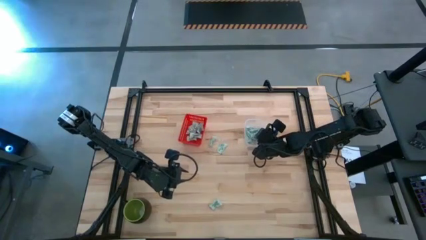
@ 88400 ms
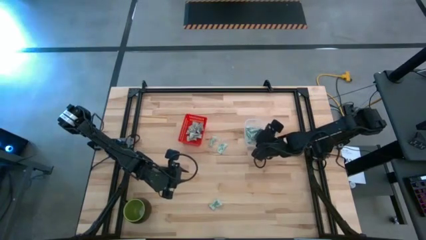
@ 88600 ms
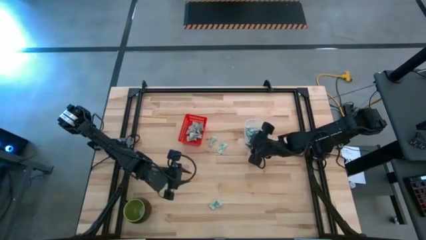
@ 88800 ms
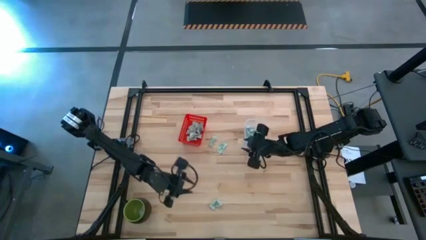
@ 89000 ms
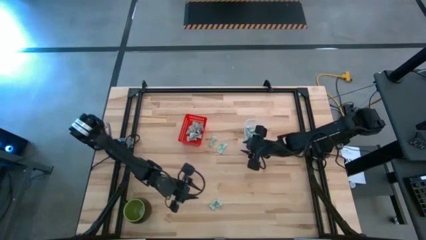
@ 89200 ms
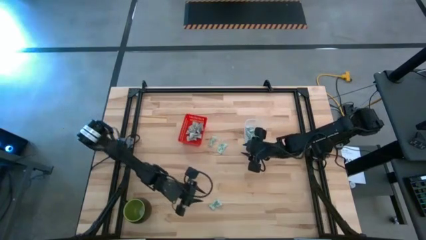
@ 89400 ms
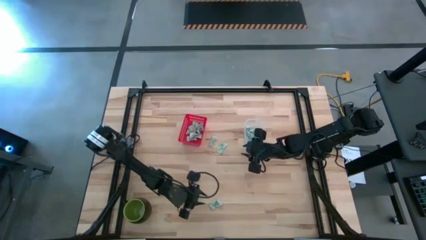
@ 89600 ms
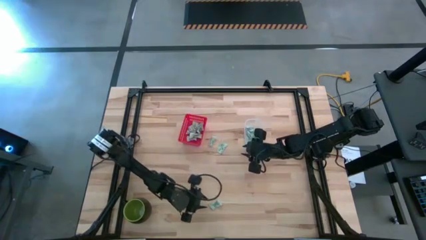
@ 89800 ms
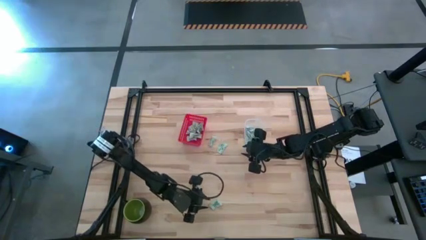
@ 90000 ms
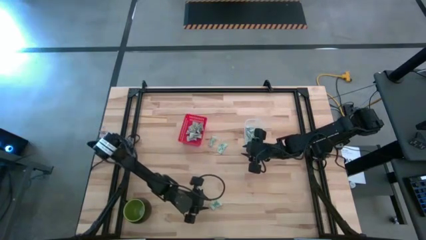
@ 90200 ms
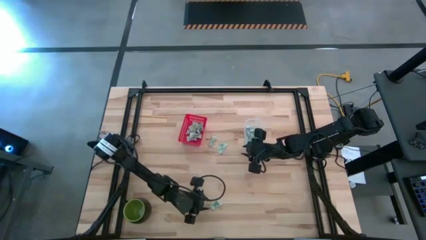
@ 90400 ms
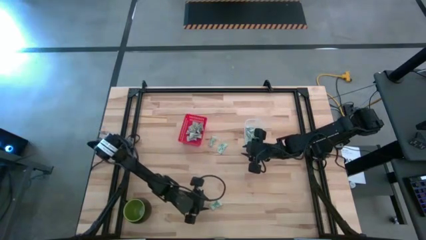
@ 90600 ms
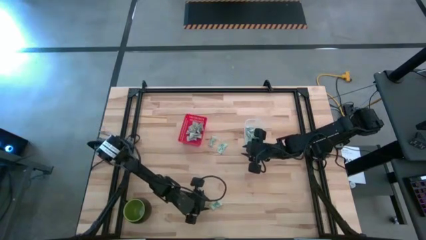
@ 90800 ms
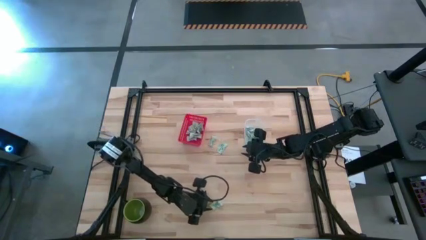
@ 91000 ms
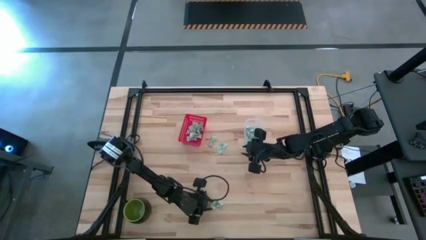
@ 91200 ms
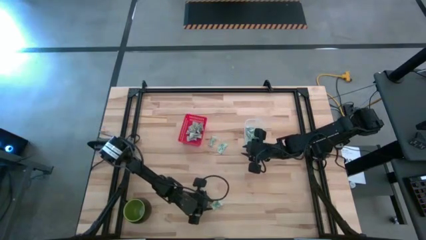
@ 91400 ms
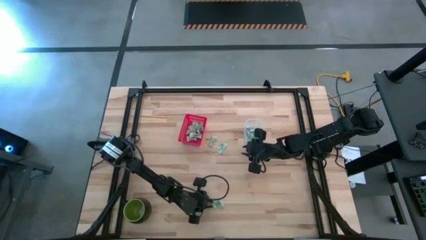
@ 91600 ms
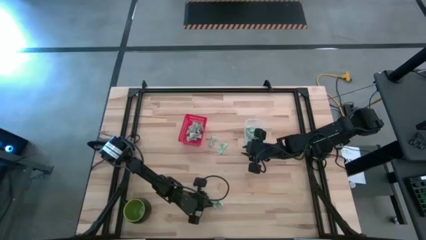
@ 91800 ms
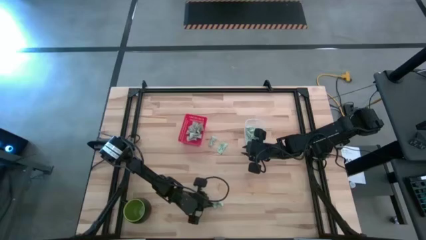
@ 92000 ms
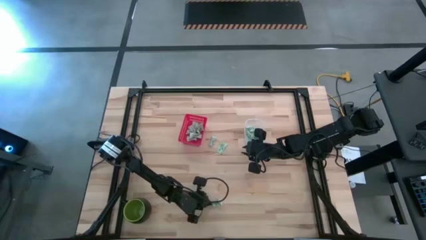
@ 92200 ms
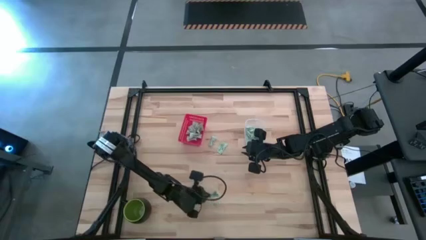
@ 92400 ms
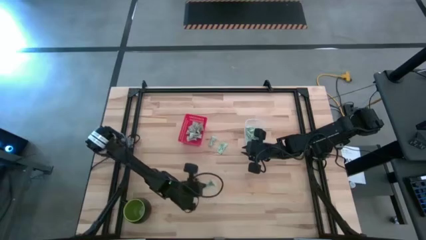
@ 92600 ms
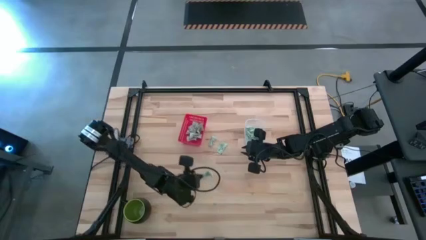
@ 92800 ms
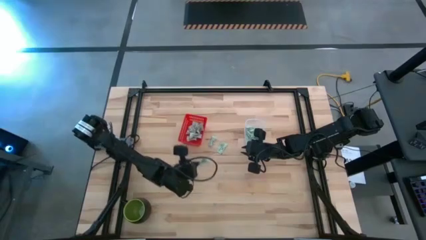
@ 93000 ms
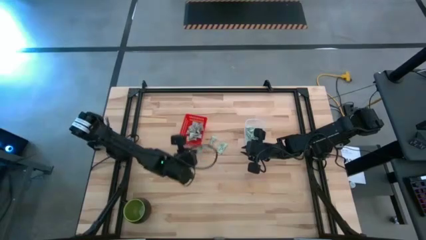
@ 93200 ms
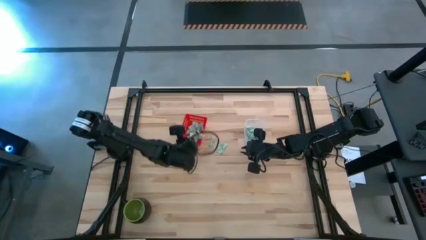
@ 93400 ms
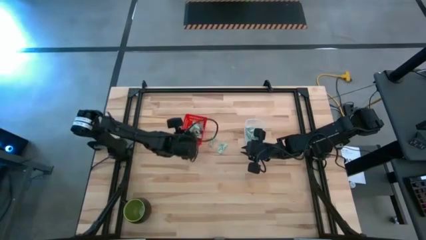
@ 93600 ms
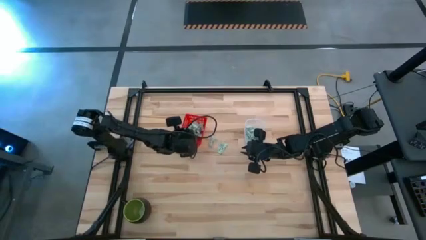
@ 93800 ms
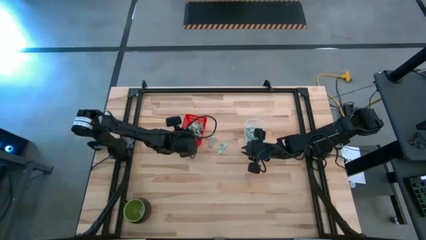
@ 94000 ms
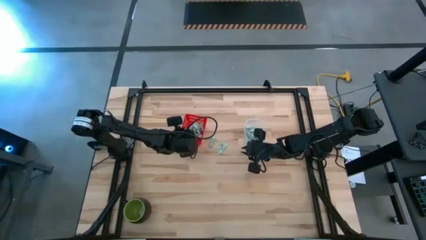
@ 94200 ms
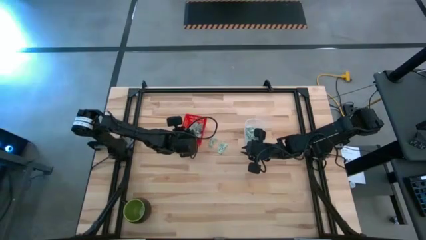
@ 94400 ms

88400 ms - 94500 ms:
Task: Pick and place items into bin
Put the stevia packet into the red bin

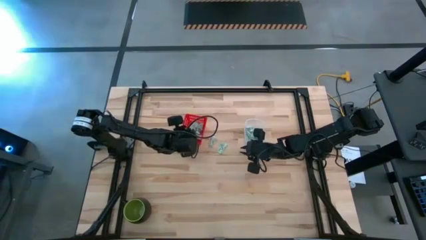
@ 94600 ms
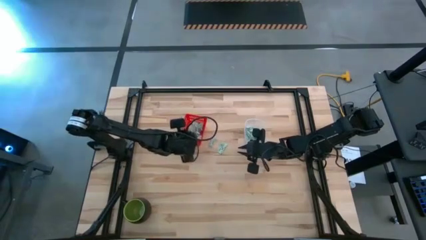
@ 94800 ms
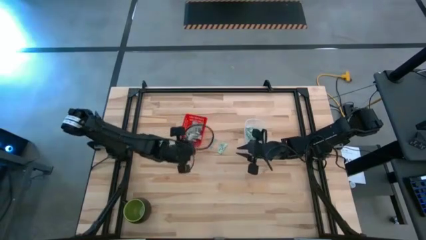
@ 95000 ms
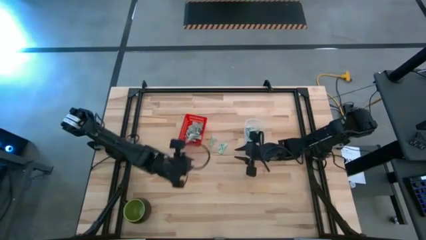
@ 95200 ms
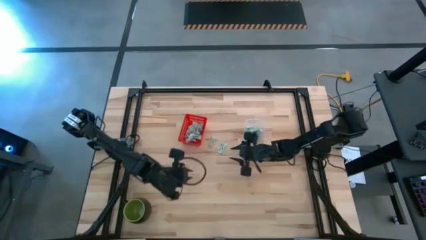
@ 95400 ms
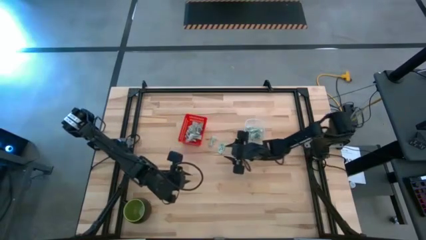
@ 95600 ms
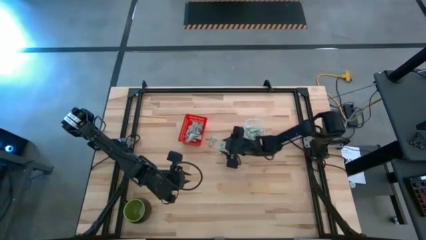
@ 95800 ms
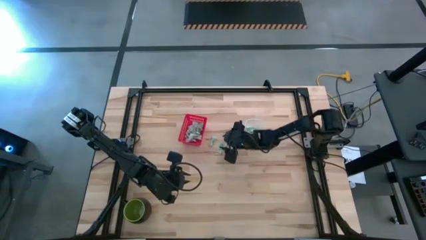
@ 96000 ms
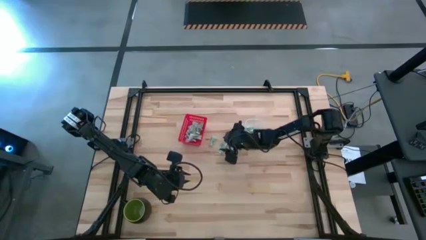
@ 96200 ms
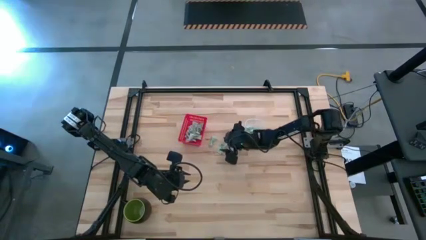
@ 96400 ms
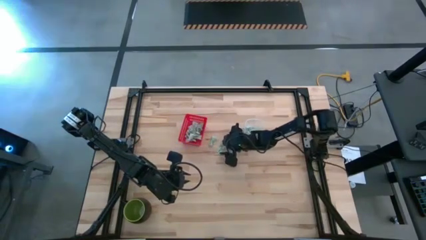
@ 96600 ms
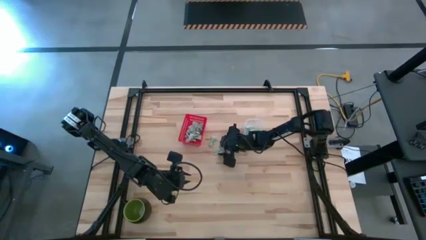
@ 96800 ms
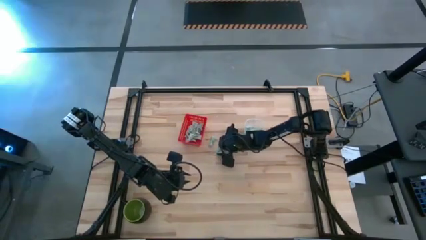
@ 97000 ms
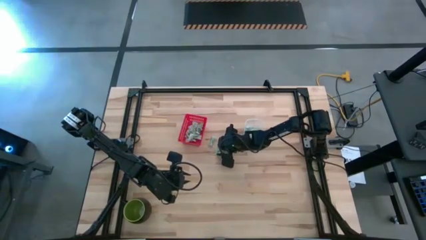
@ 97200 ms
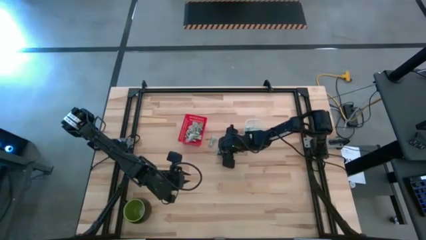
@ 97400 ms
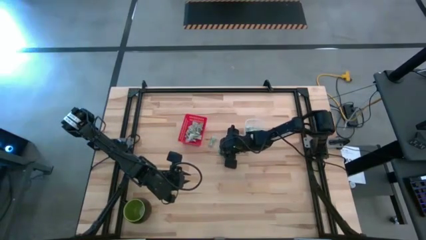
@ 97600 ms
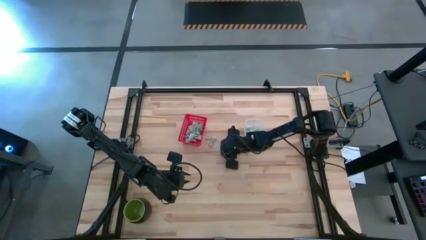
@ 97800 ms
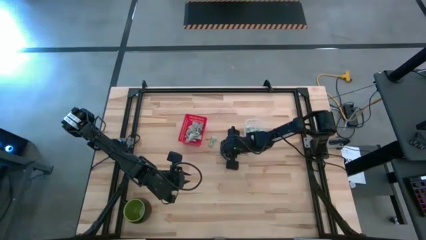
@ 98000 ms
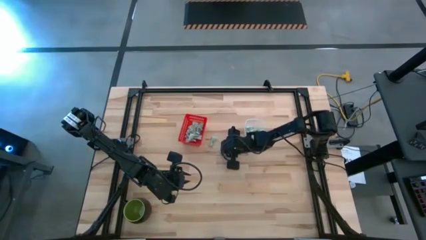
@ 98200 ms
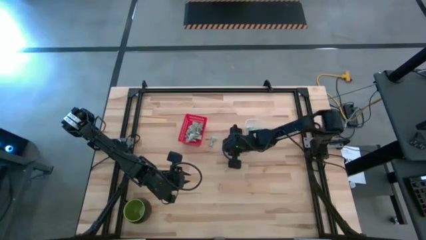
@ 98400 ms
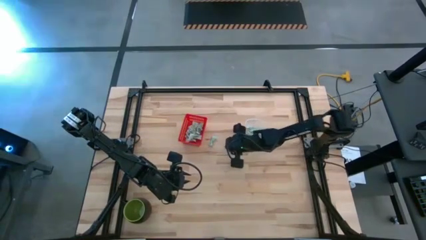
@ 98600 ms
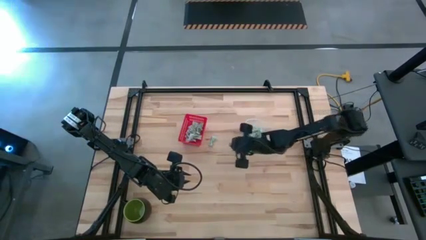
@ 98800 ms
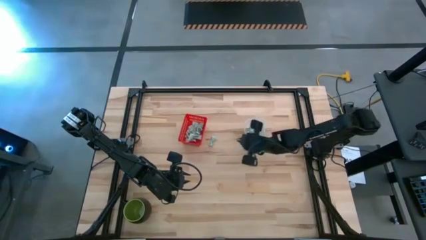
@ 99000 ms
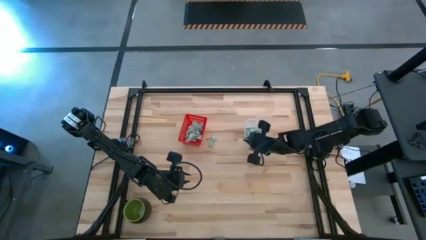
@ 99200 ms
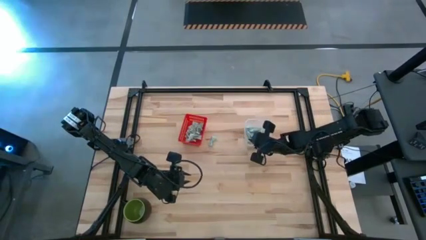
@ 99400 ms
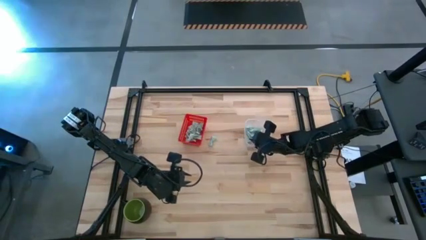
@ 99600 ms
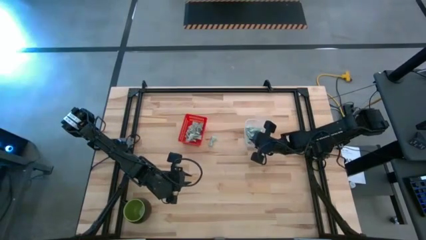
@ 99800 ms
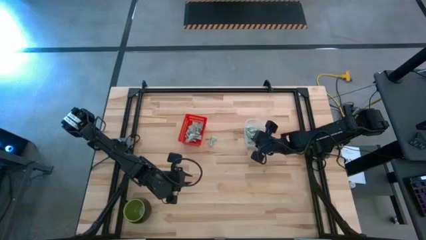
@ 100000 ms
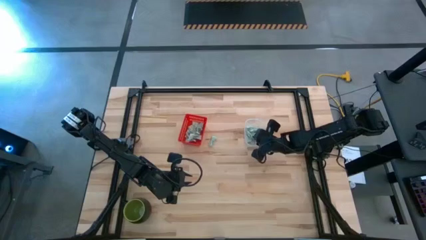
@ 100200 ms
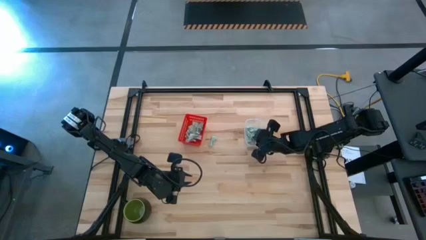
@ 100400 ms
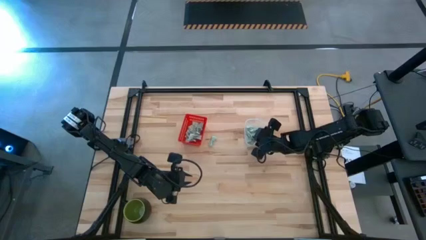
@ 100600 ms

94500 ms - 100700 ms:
Put the stevia packet into the transparent bin

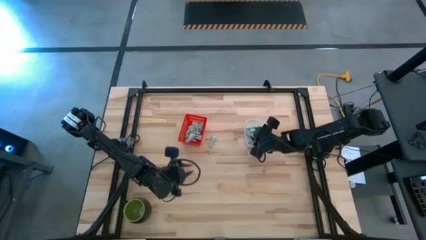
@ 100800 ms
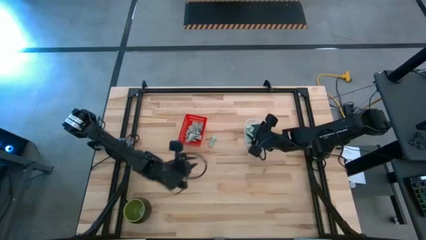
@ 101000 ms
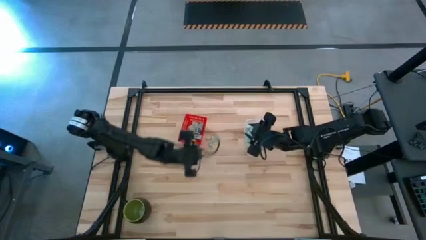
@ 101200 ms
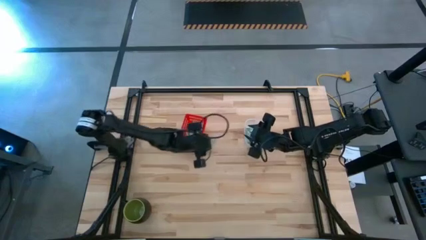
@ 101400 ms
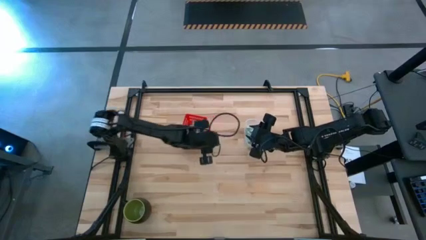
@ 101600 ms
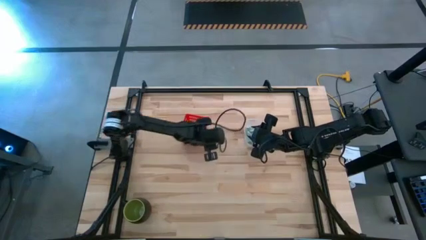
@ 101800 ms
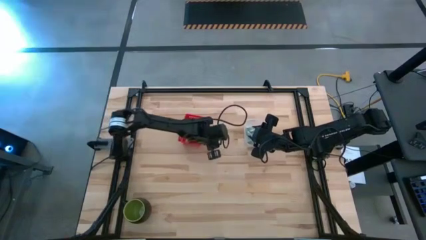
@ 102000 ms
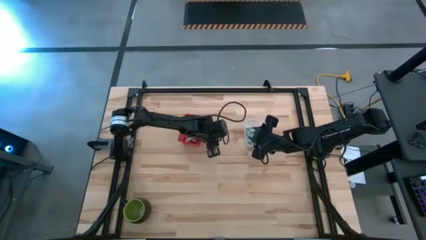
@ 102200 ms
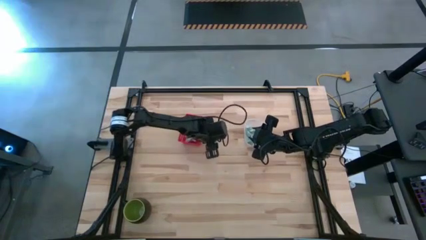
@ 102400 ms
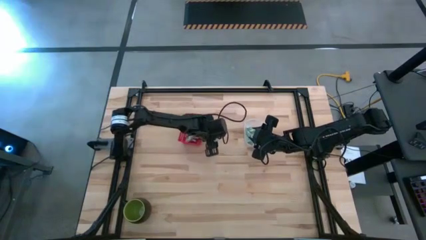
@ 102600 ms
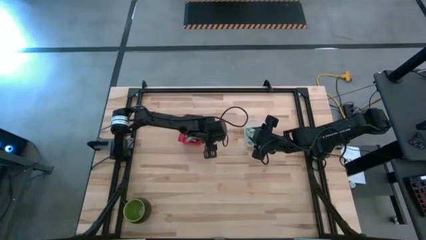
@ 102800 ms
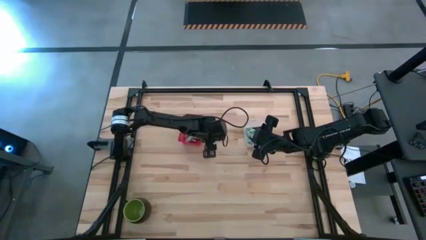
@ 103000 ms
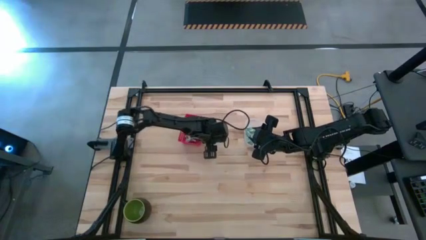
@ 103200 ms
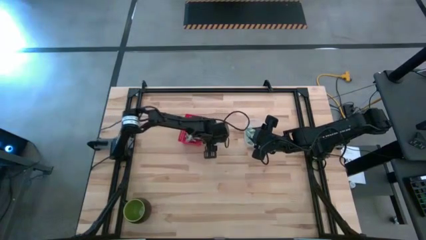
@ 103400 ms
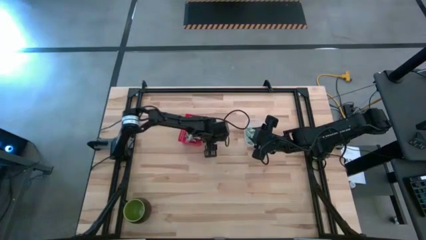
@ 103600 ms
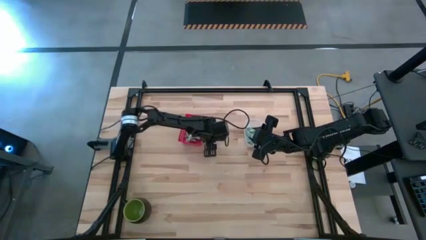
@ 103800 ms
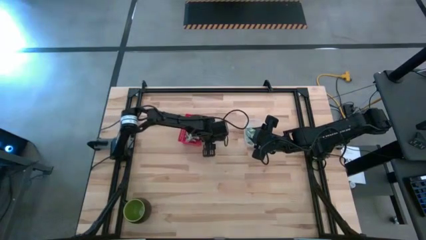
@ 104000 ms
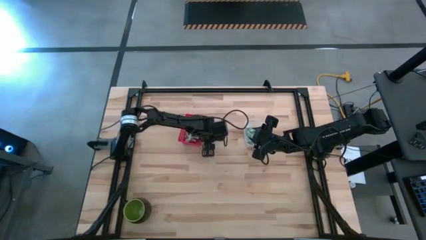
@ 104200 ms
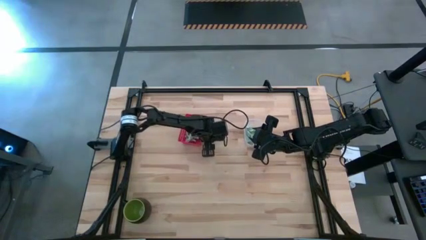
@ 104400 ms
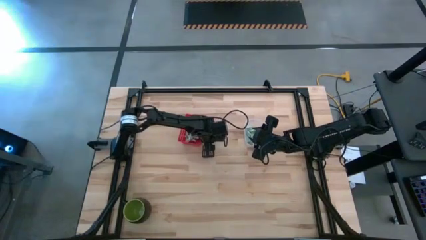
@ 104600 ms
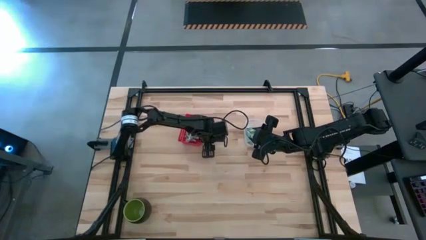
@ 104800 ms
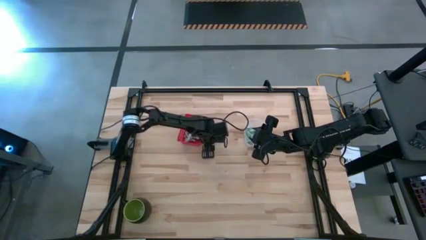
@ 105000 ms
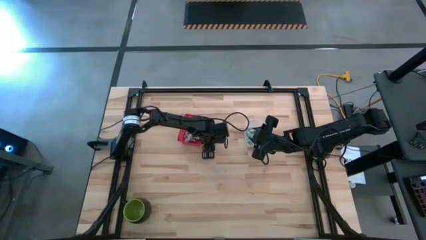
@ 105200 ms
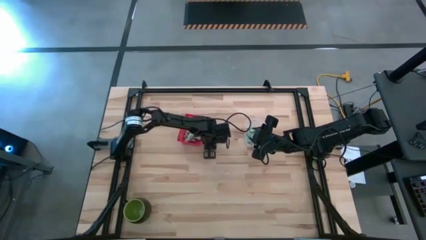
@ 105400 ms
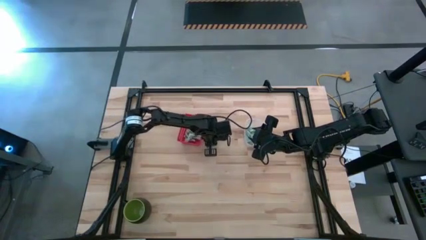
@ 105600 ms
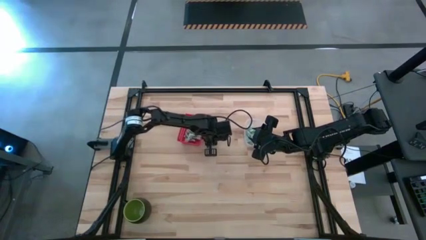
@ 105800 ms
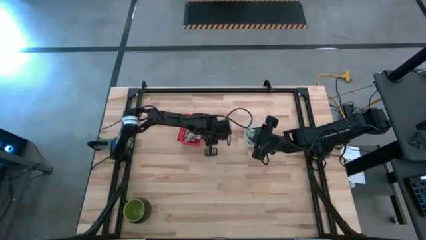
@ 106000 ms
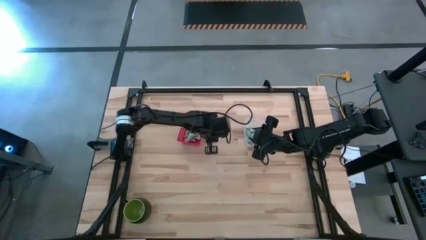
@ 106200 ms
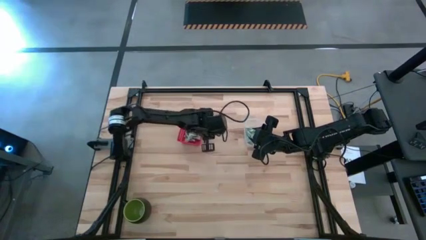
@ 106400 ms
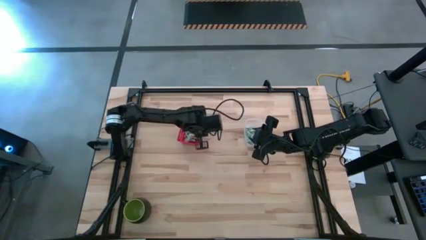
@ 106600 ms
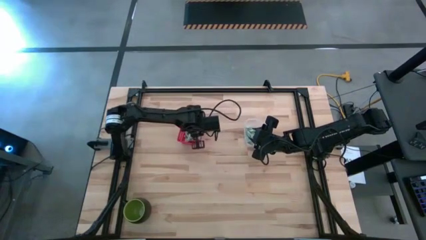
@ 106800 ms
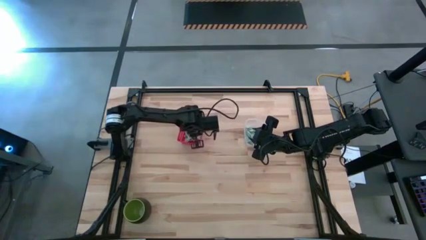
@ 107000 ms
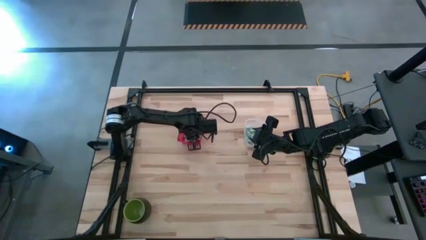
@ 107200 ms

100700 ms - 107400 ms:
Put the stevia packet into the red bin
